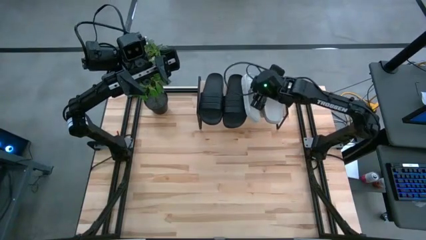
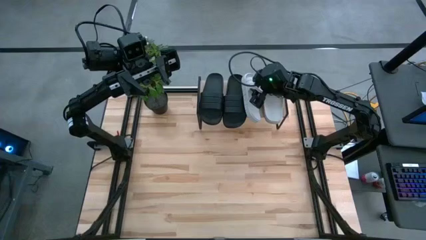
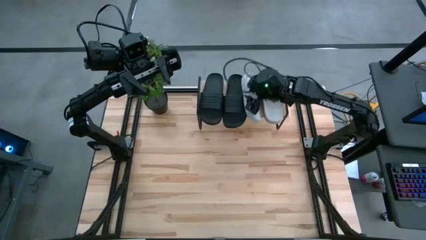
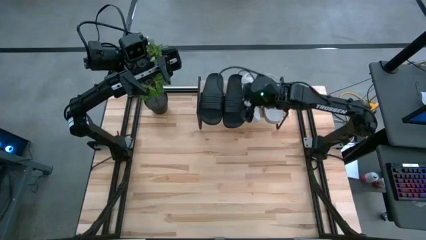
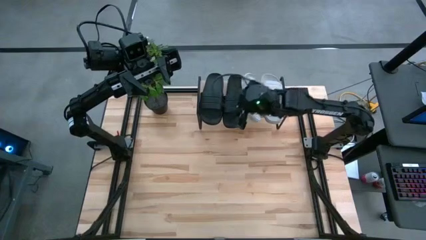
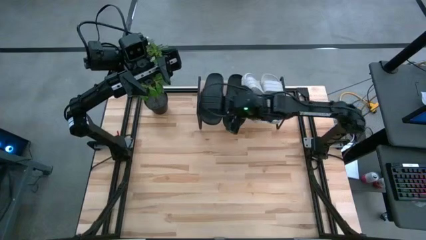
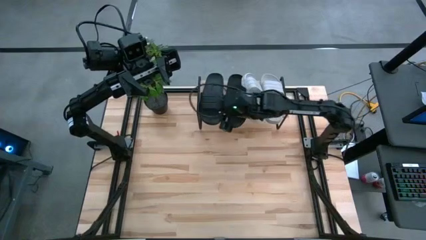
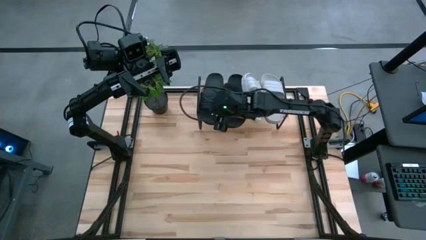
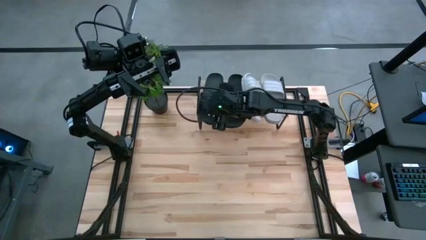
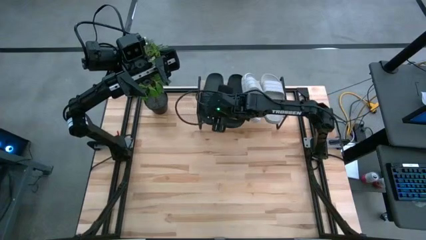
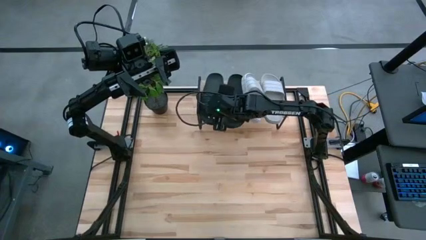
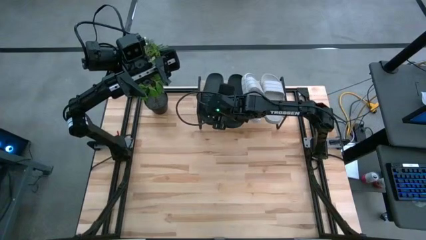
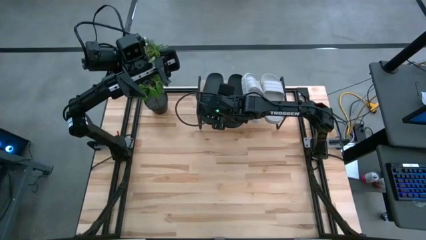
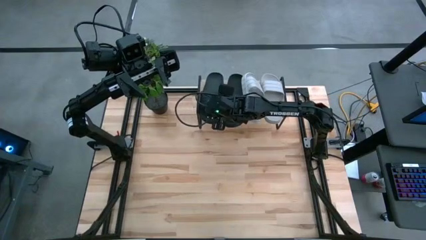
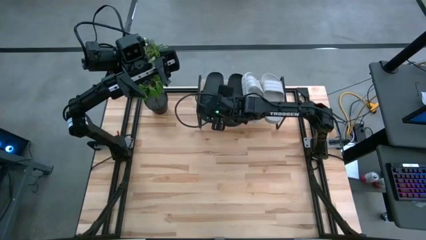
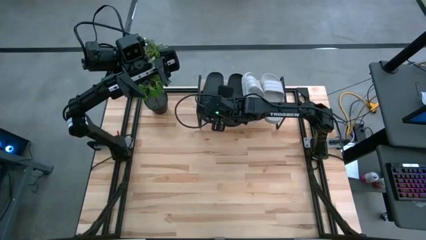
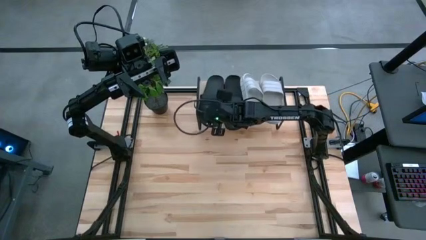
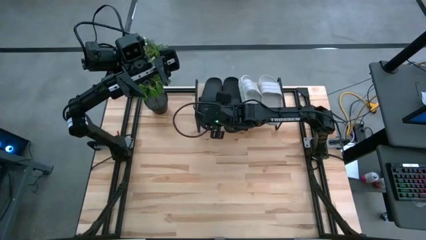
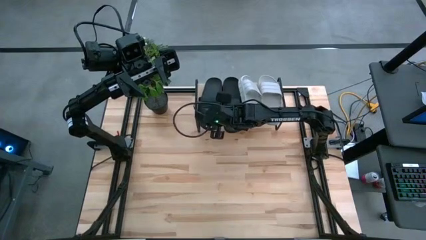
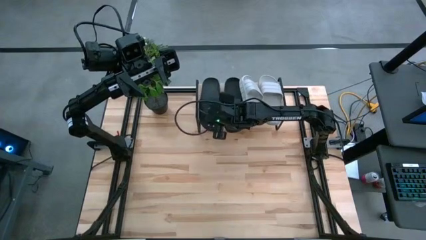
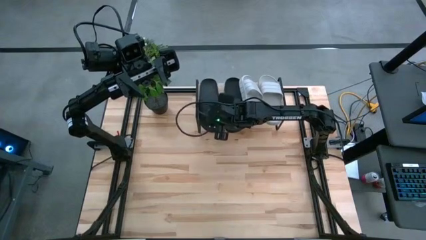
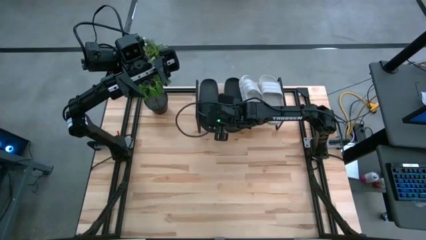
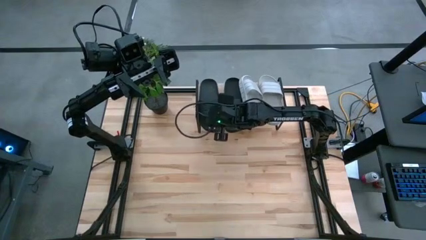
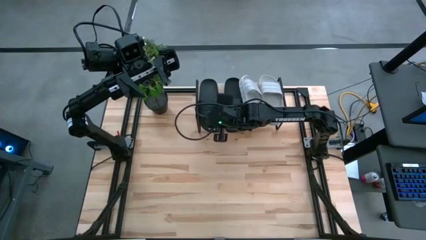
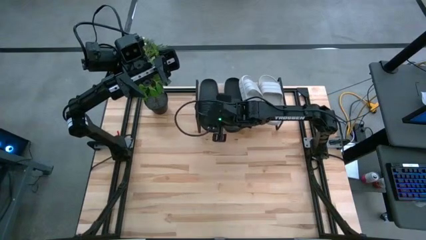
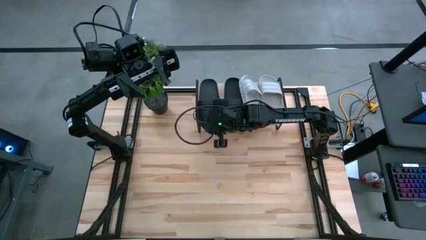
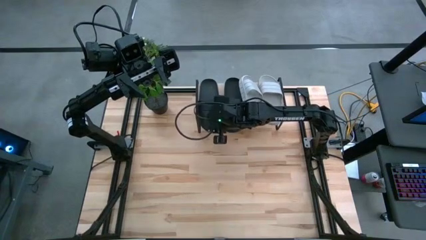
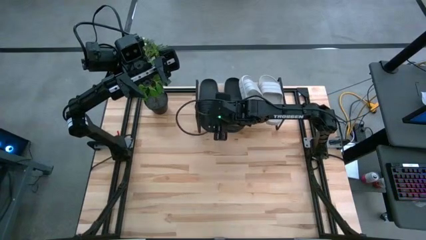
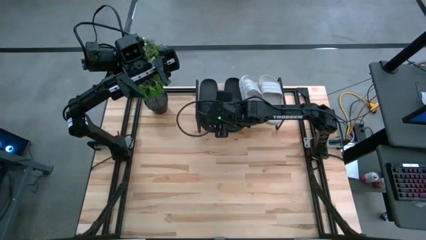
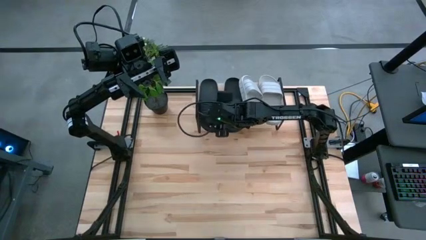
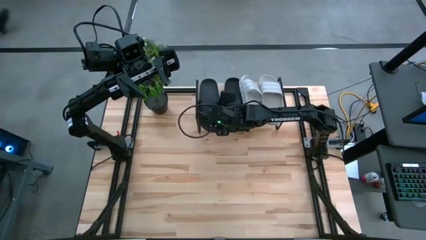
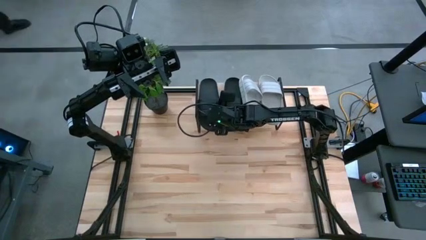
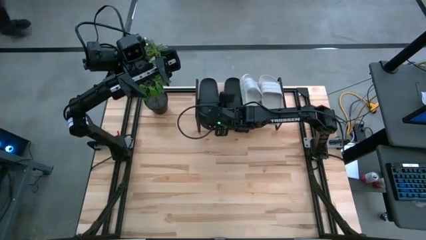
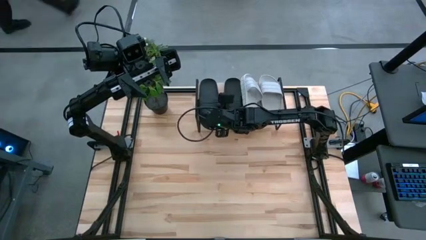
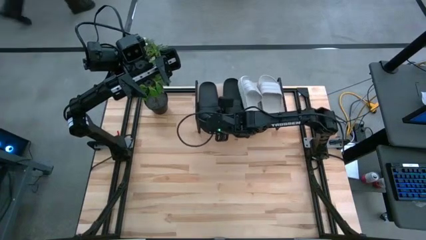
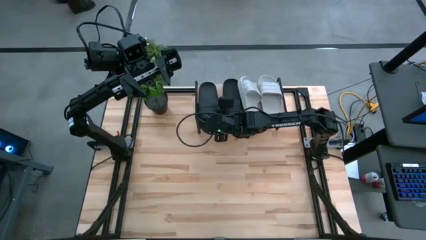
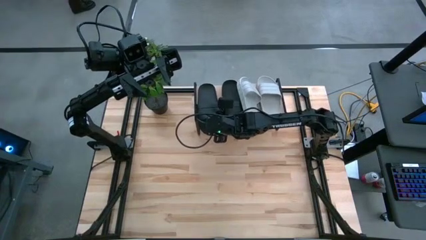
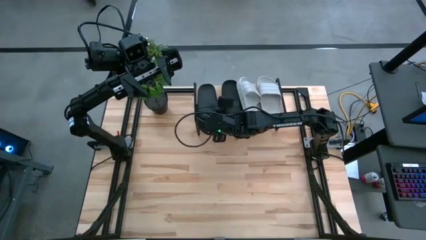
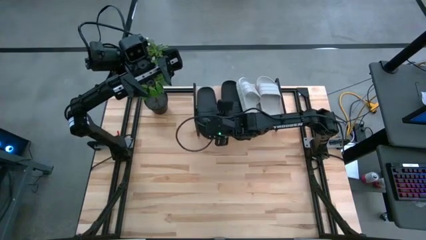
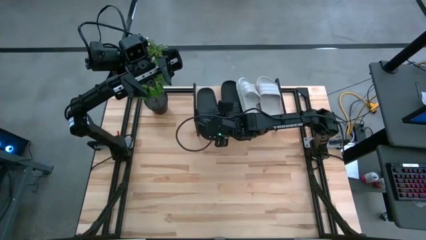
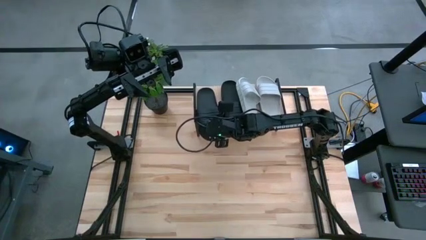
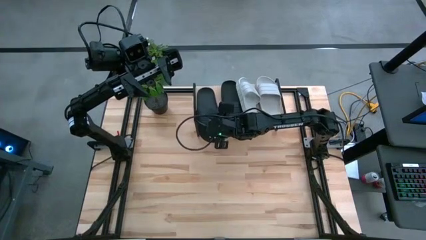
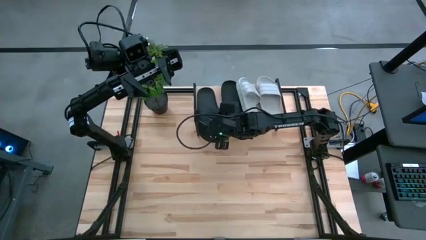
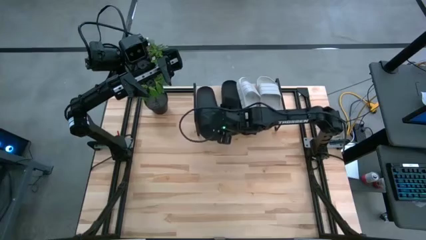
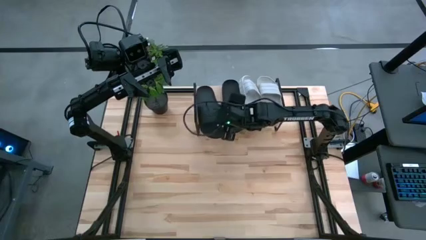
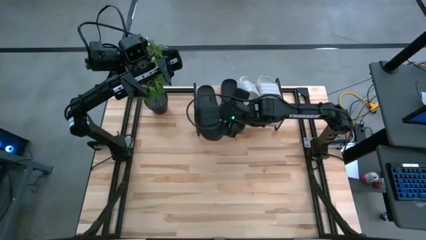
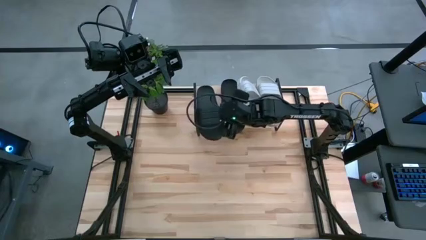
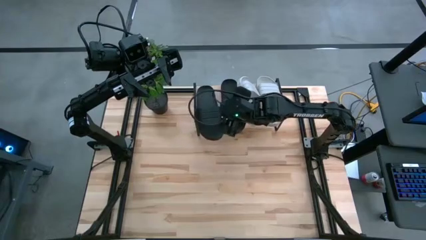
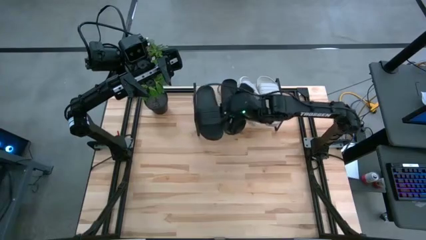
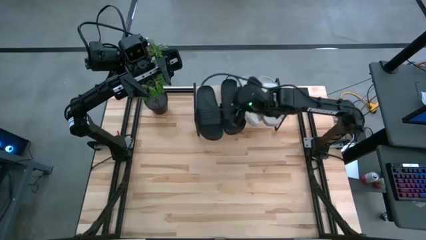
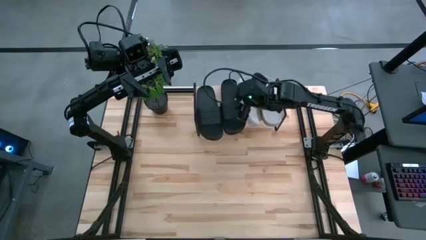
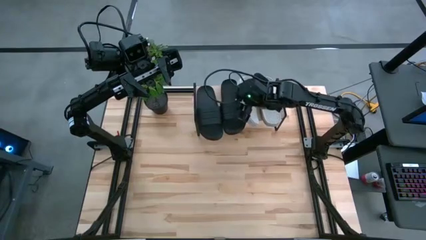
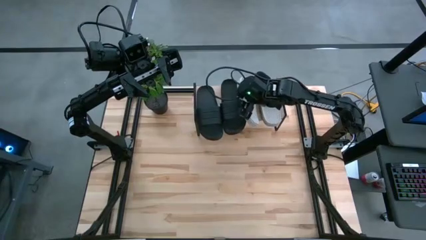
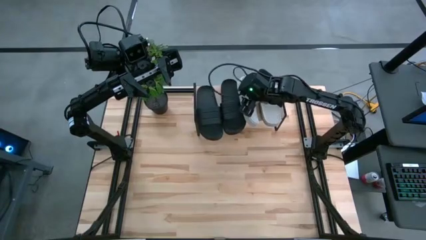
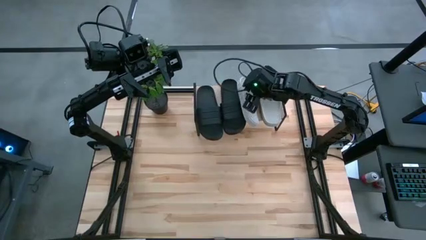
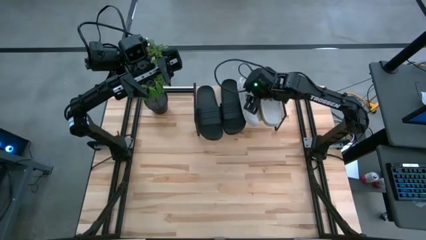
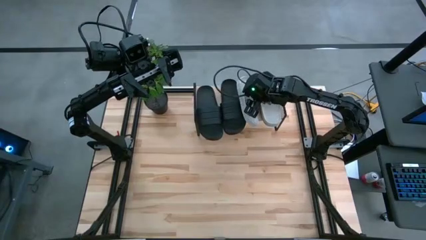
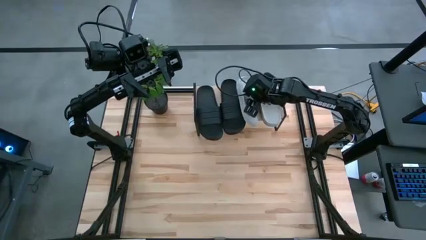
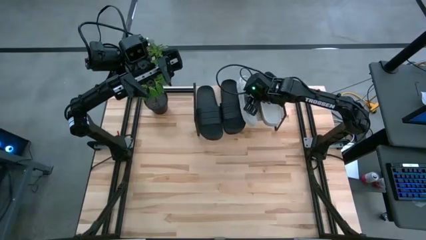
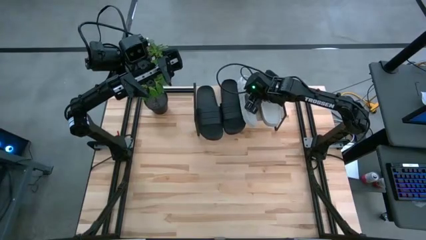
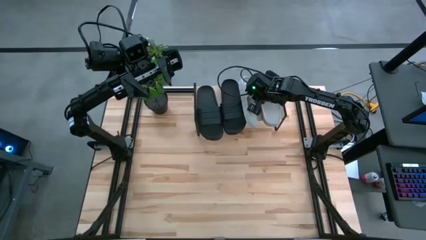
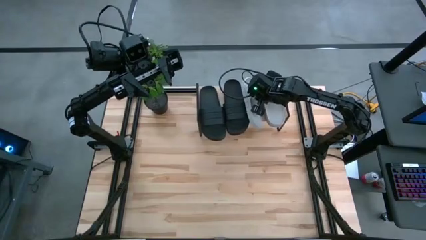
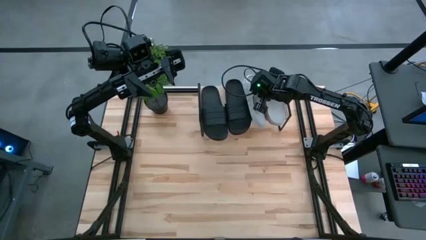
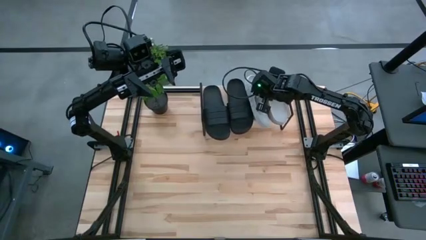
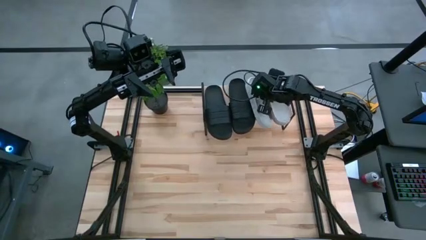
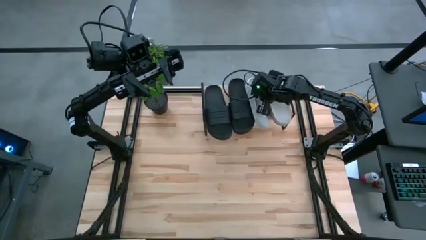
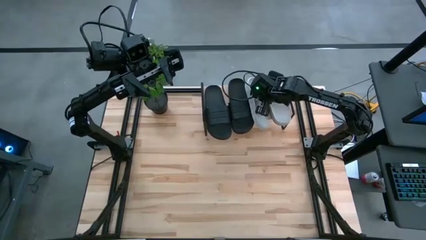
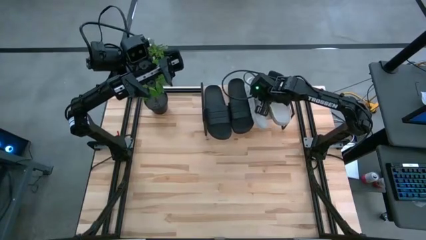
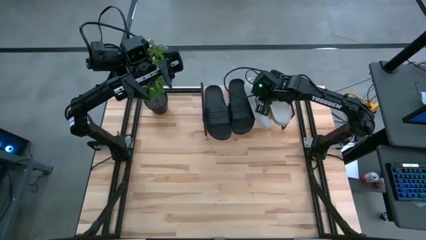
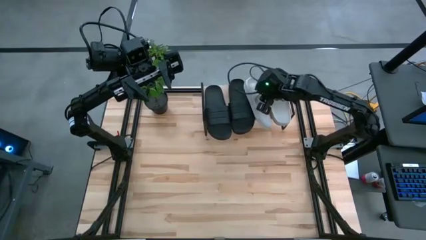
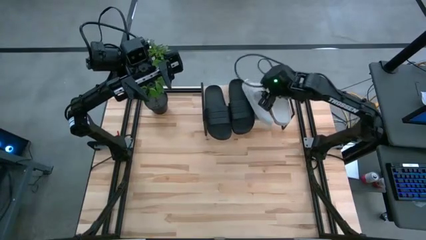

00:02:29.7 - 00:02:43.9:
Task: Pick and place slides into the shelf
Adjust the slides on the shelf

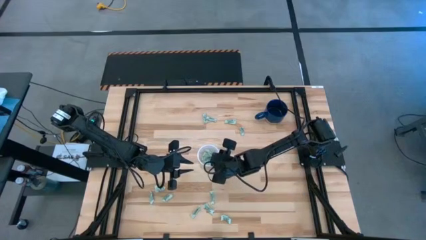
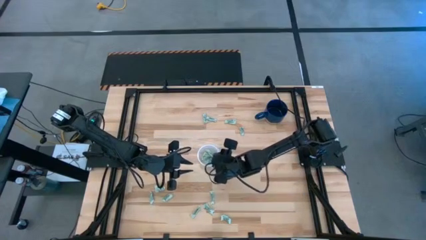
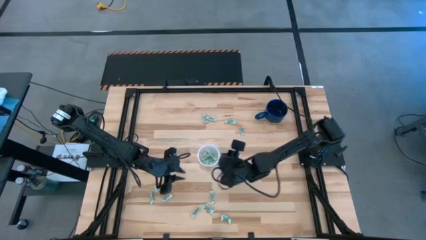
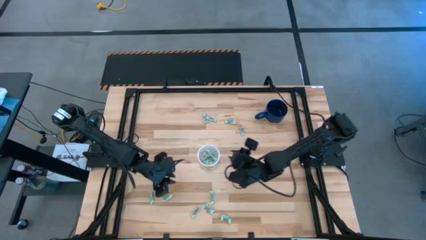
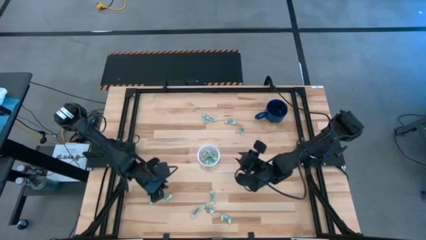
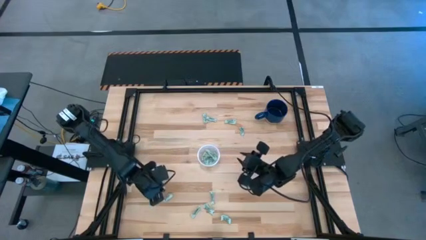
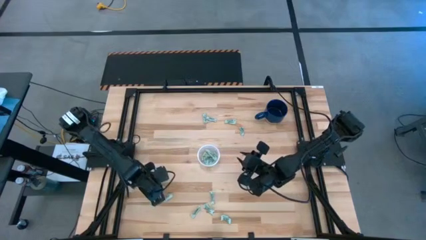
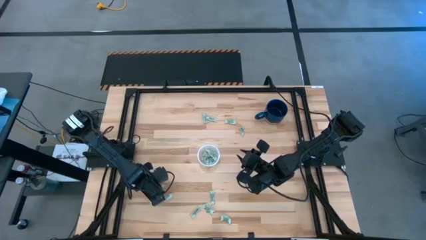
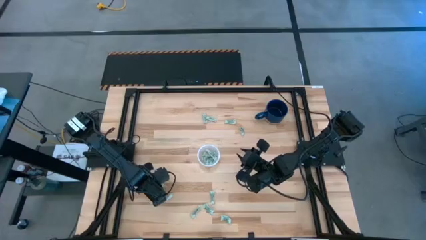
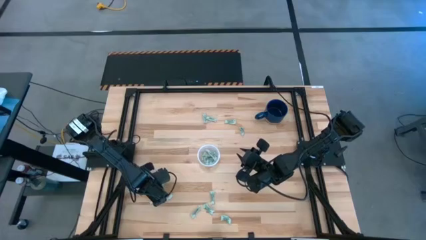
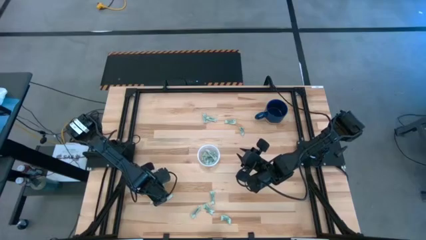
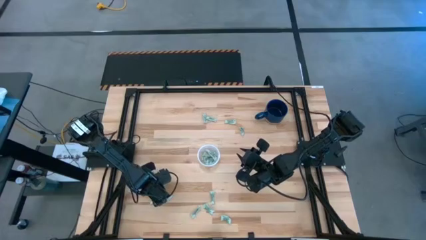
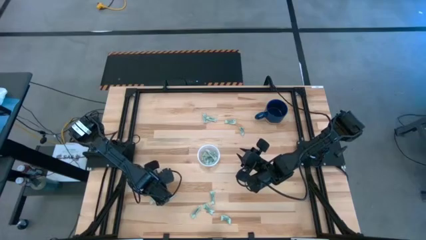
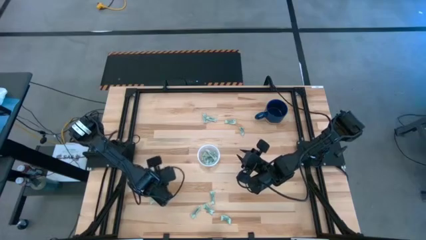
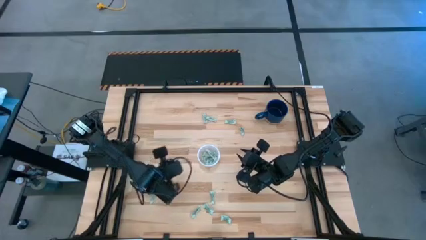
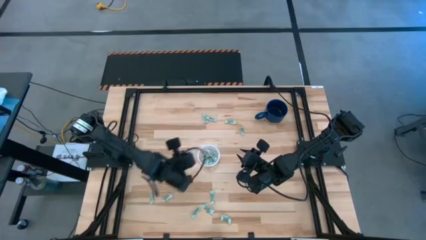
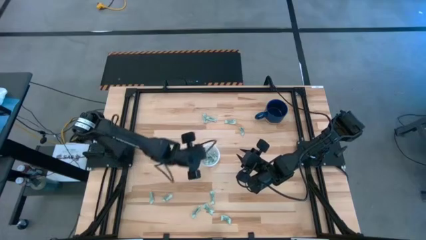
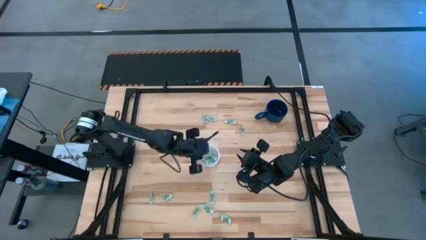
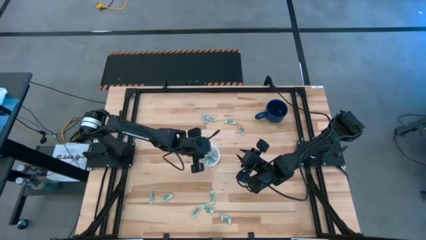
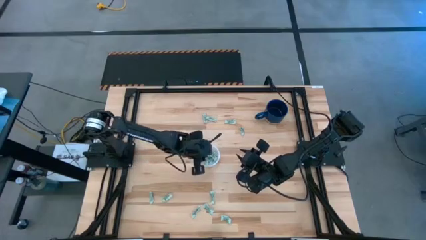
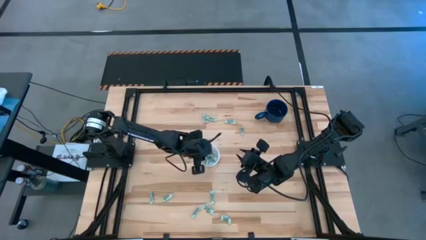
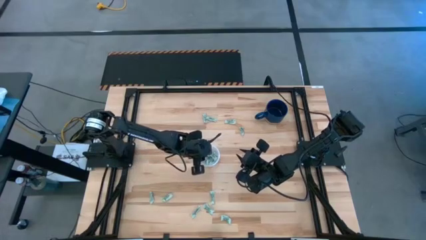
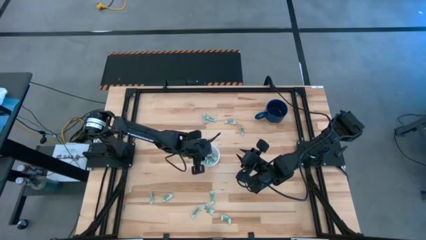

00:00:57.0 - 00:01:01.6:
Task: Pick and place items into bin
Put the stevia packet into the transparent bin
